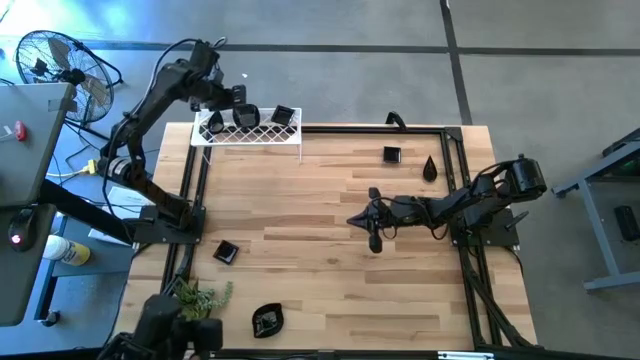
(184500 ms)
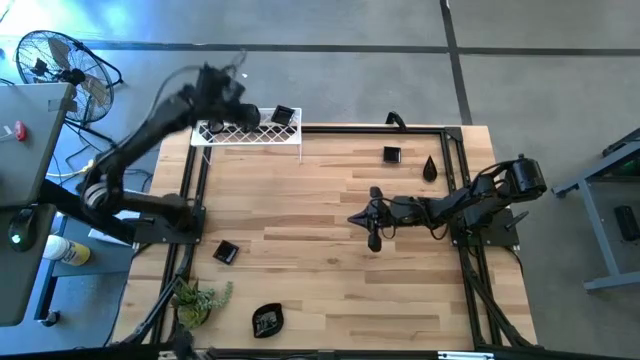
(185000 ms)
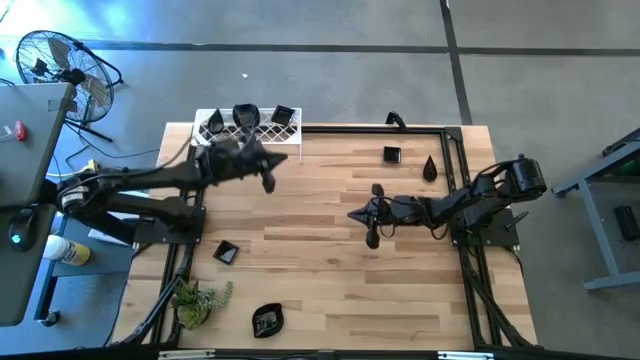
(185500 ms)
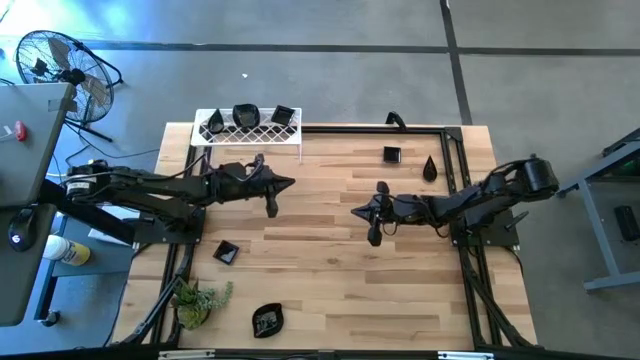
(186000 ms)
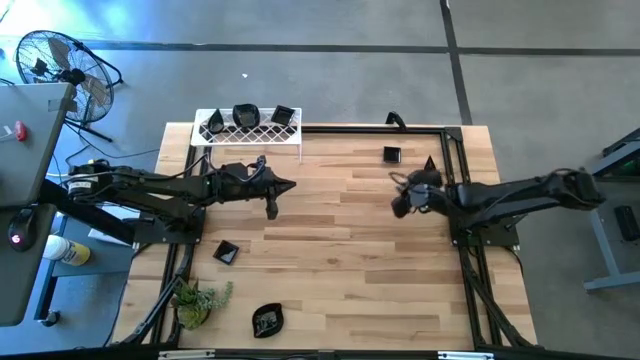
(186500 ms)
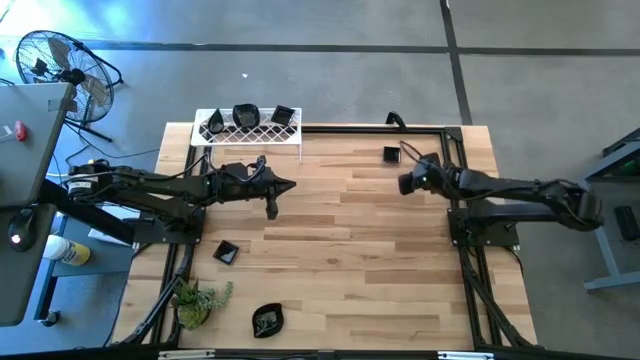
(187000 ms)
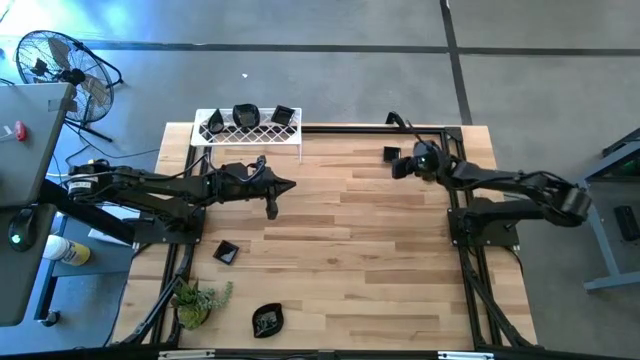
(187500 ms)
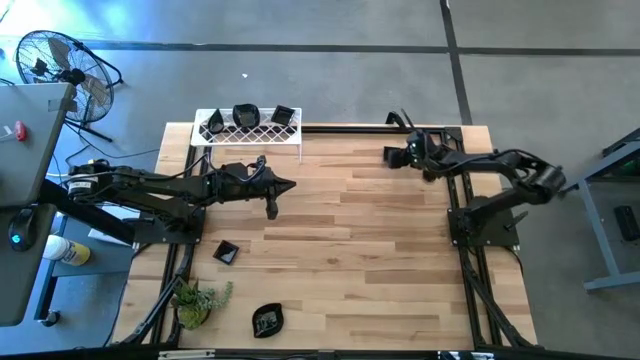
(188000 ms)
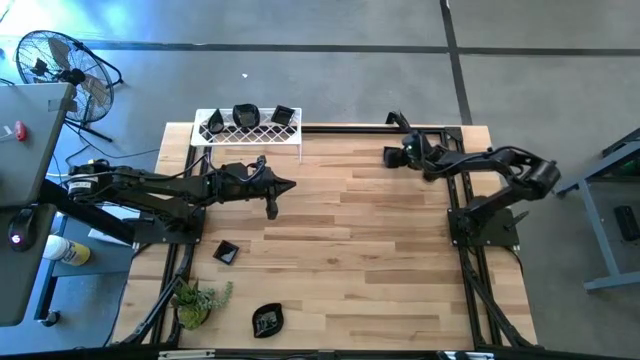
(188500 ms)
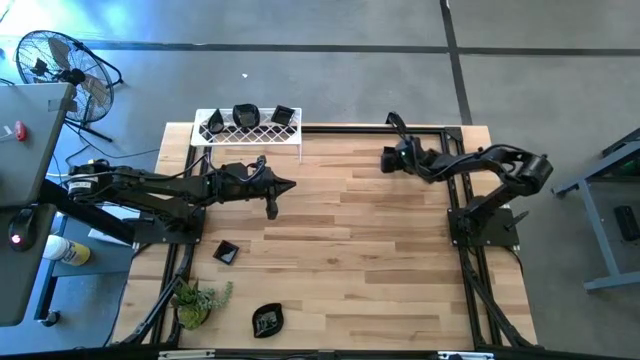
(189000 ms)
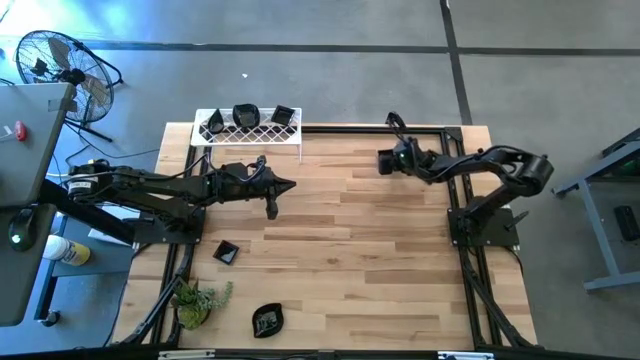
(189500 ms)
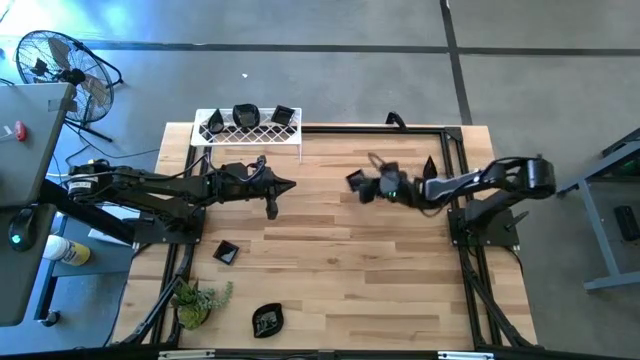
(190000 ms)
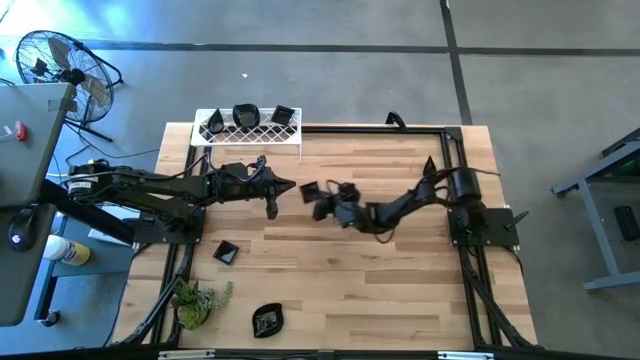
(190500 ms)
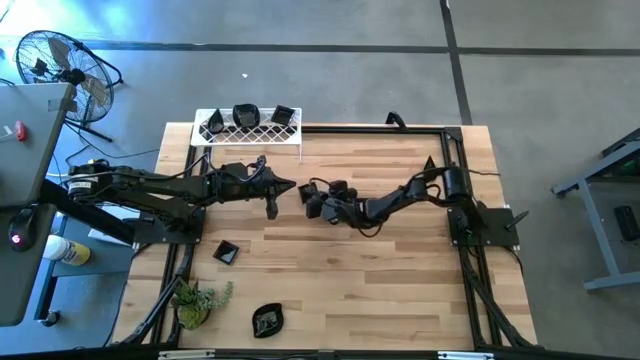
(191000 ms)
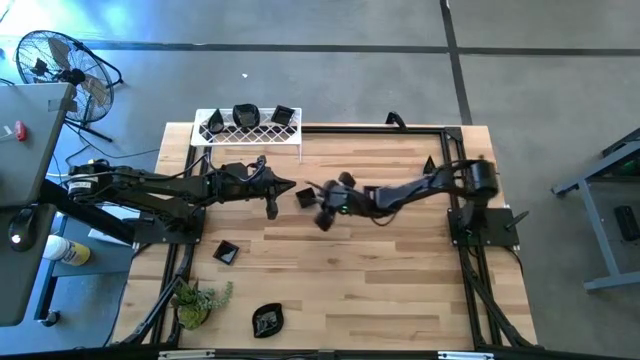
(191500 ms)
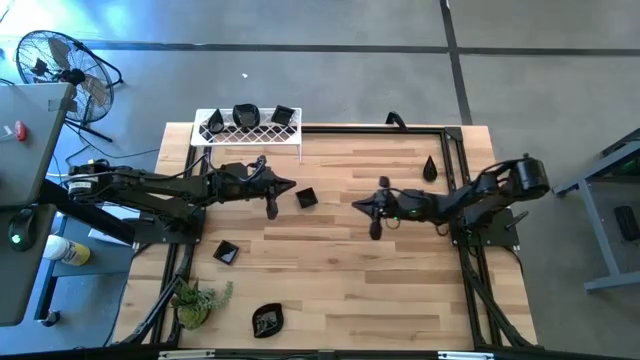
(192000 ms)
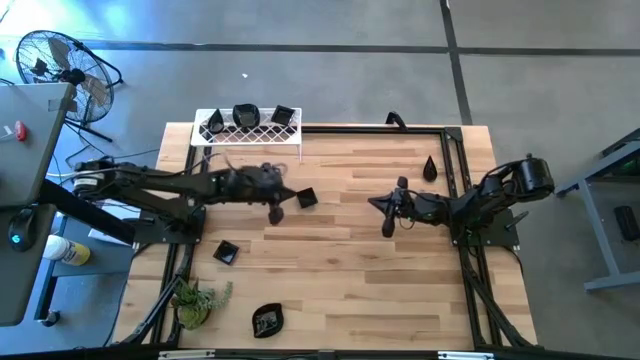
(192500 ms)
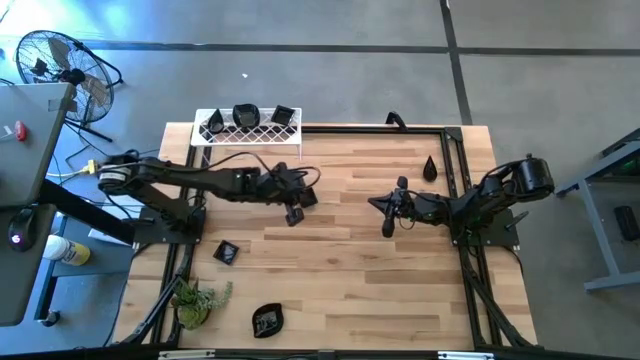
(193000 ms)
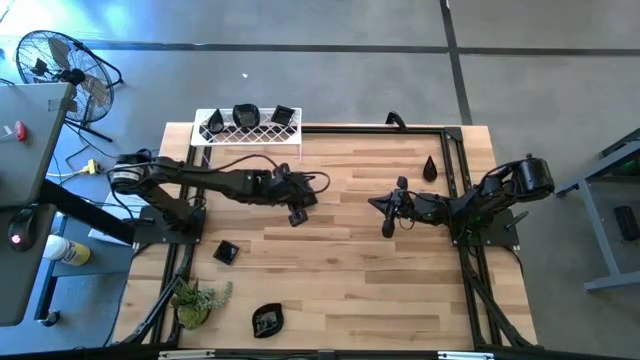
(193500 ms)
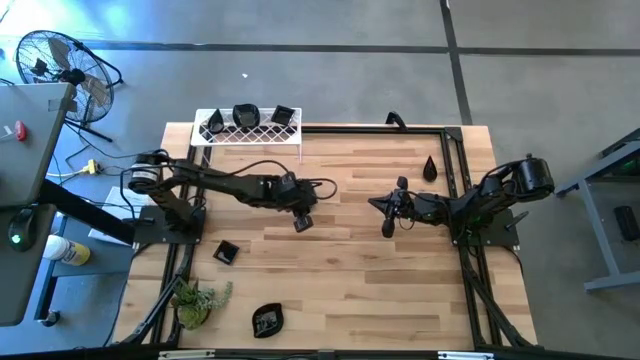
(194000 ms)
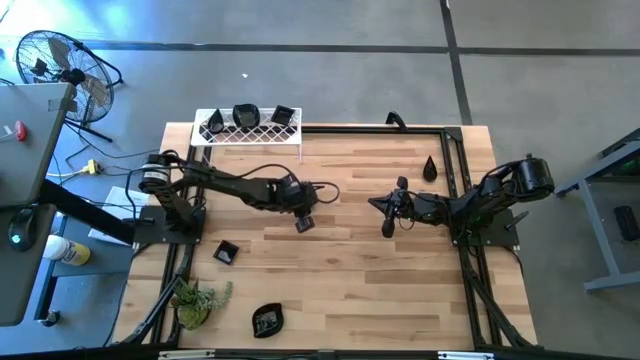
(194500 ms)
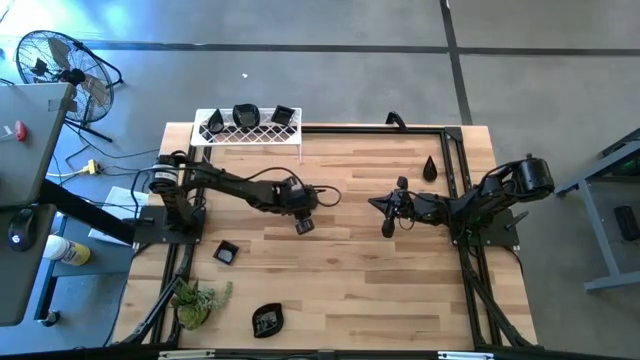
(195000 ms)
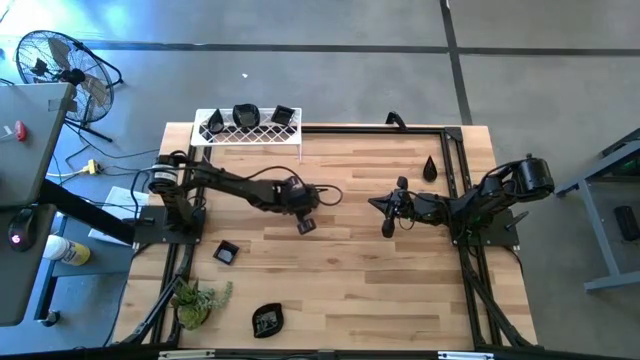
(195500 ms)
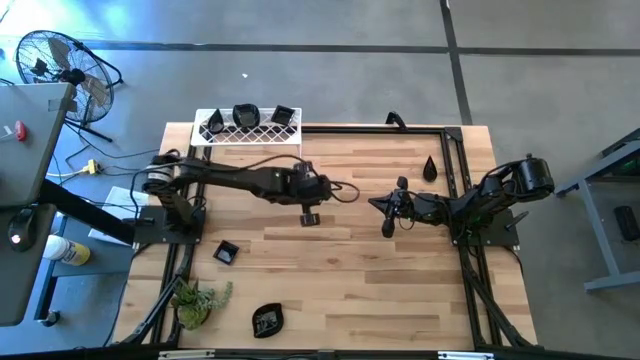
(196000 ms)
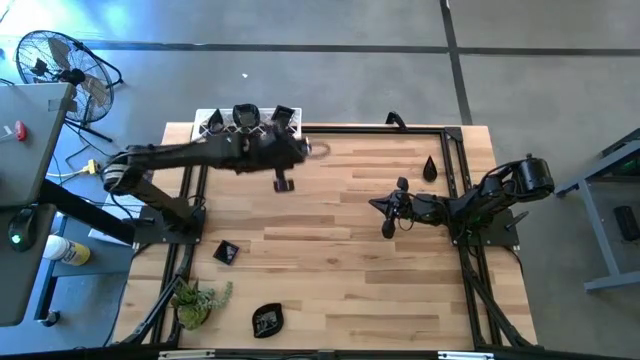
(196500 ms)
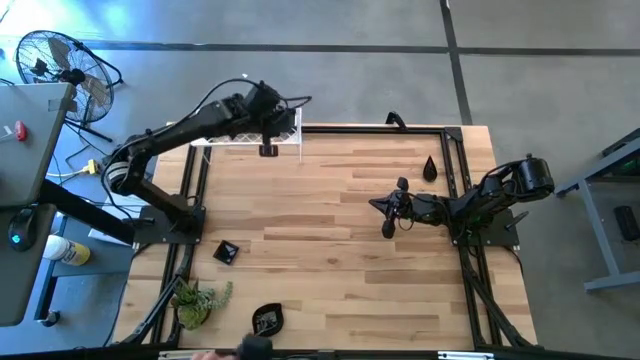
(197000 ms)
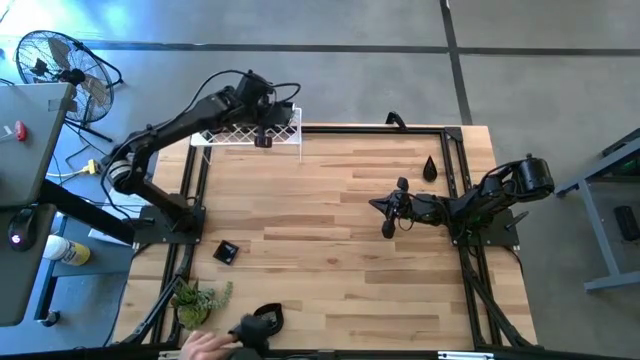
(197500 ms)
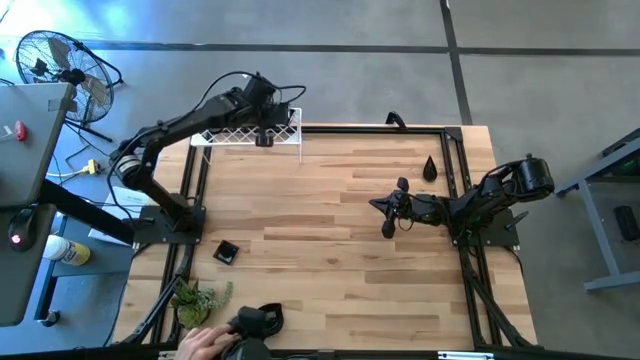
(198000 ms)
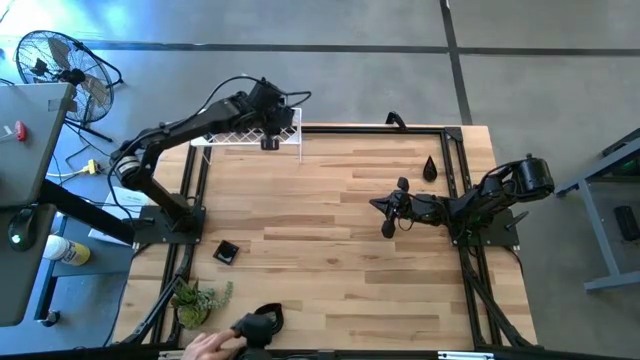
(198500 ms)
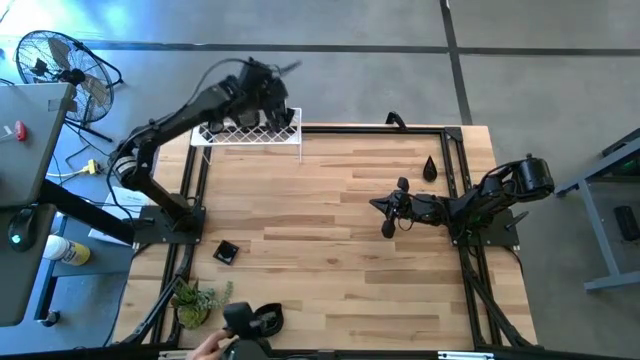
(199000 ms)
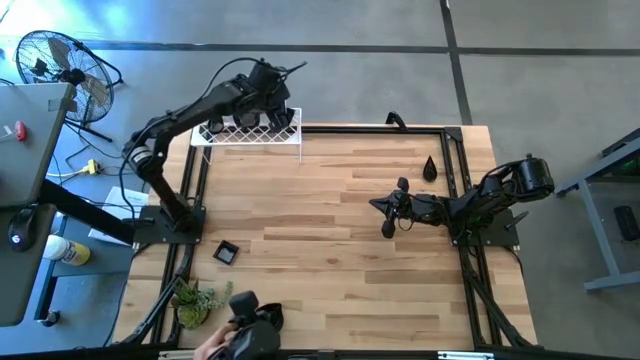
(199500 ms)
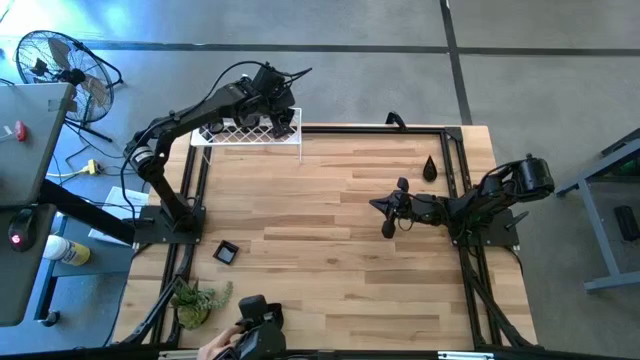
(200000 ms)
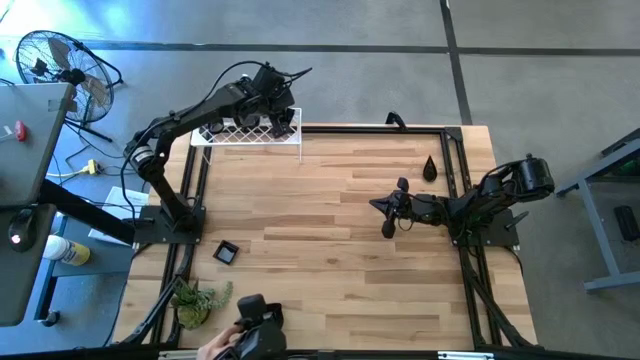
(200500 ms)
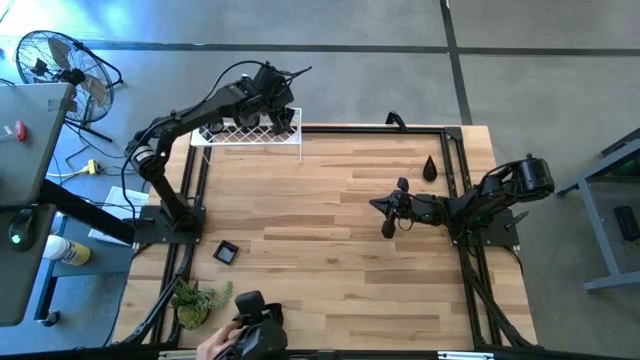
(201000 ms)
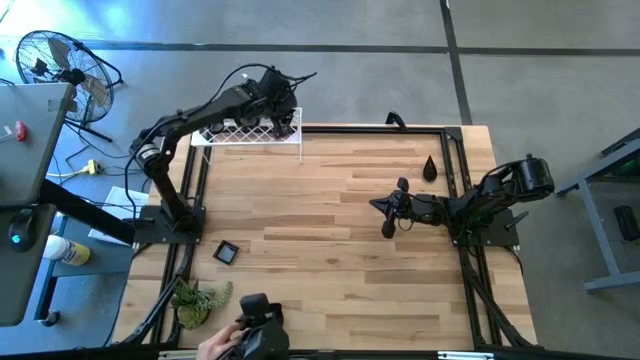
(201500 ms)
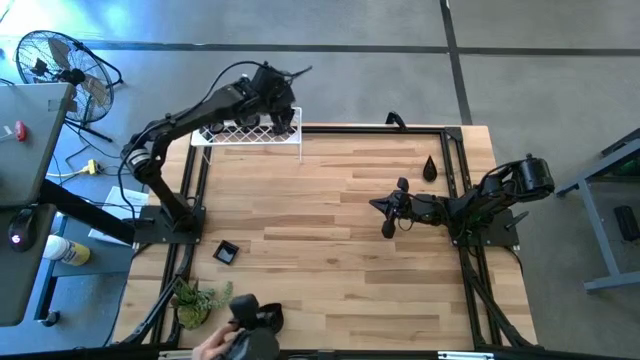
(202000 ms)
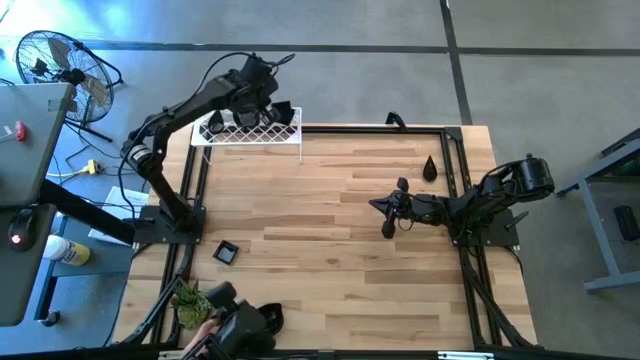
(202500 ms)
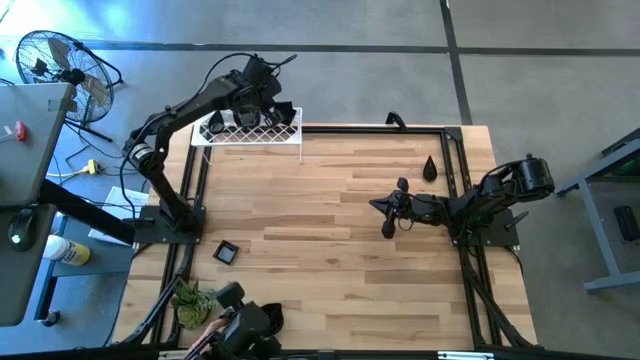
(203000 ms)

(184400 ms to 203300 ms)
Task: Pick & Place Mini shaped plates
Stack the top square plate on top of the square plates on the shelf

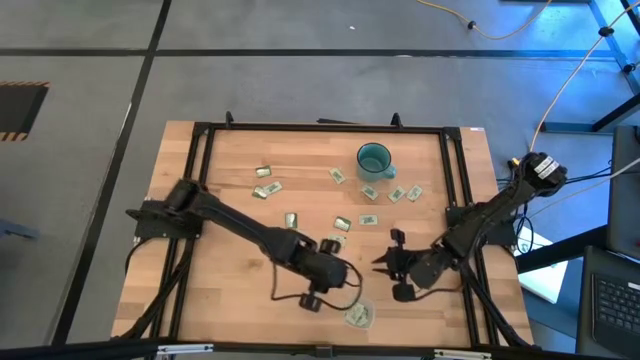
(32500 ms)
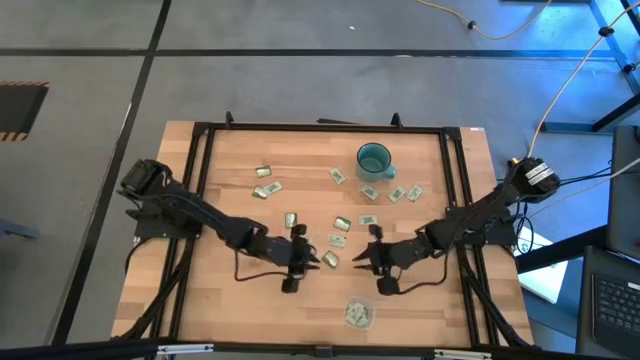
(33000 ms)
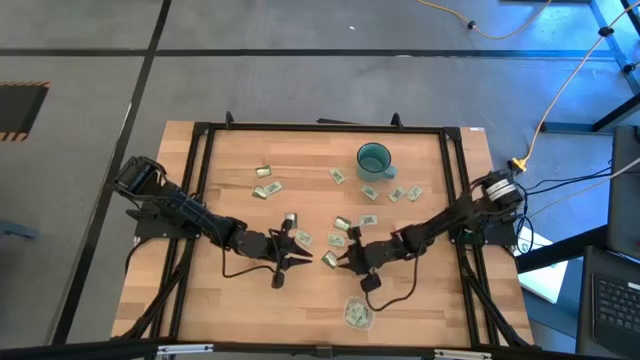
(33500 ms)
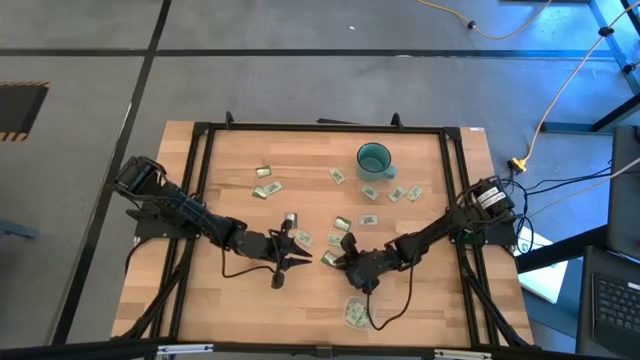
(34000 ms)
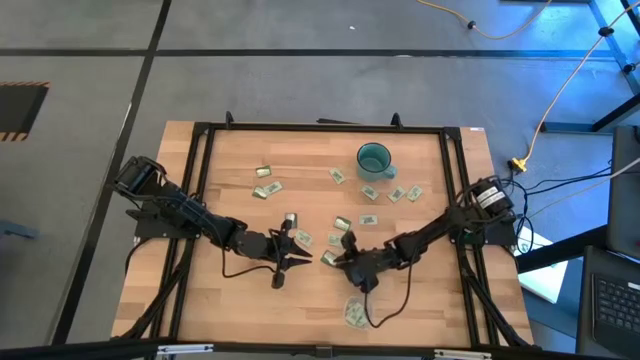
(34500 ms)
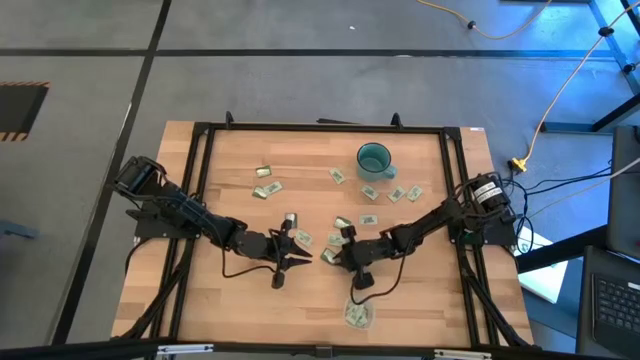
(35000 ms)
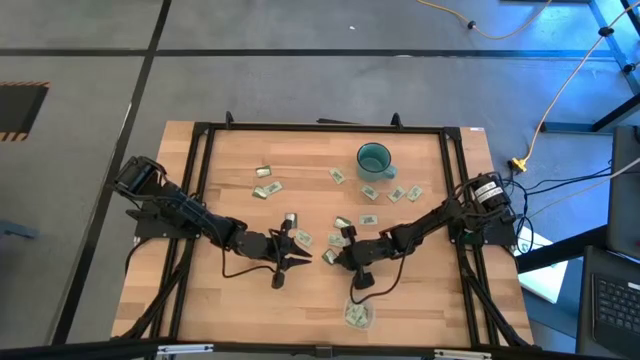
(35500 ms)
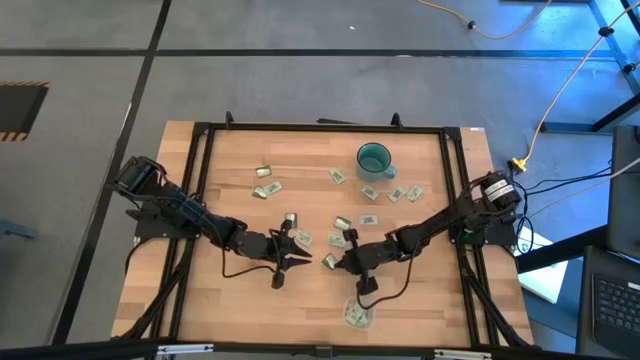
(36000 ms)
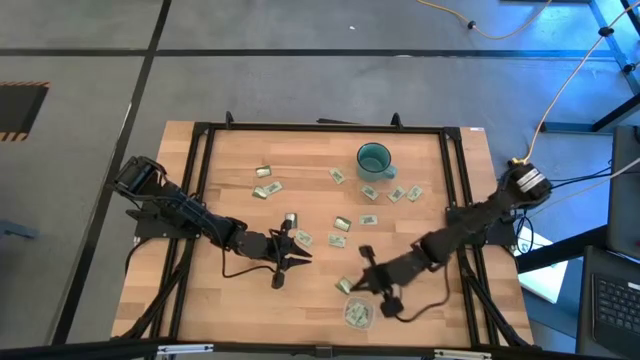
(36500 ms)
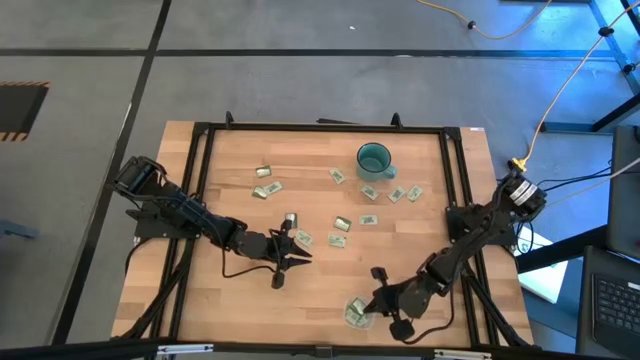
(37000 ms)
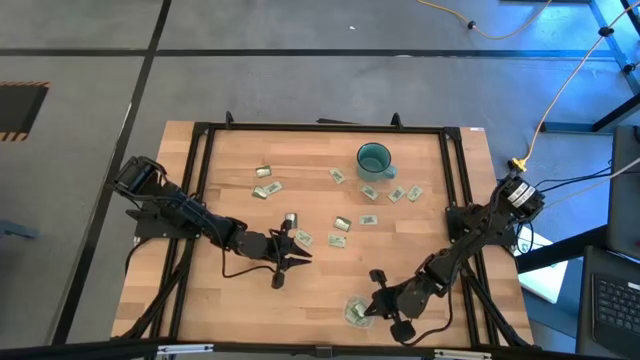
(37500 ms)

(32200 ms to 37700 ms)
Task: Pick and place items into bin
Put the green truvia packet into the transparent bin
